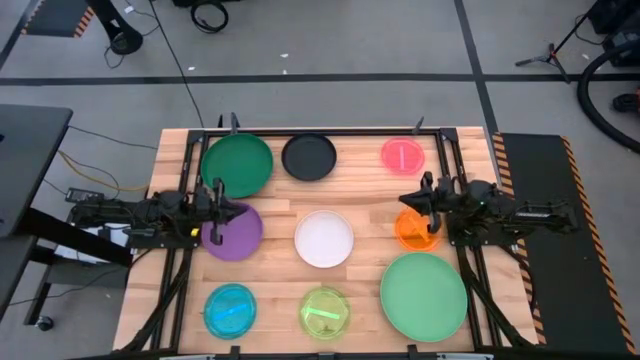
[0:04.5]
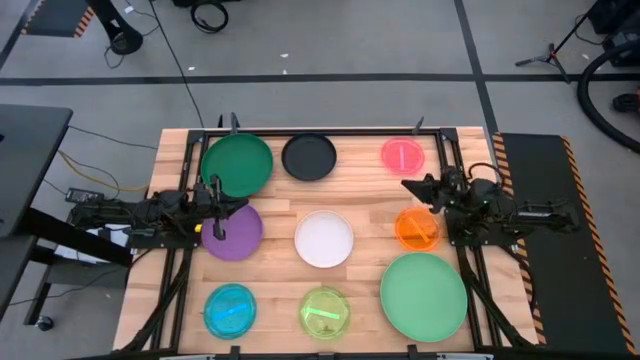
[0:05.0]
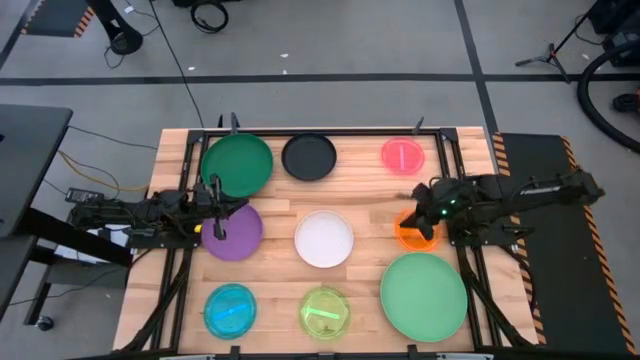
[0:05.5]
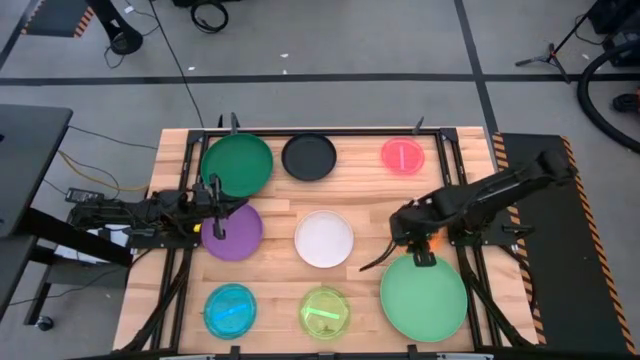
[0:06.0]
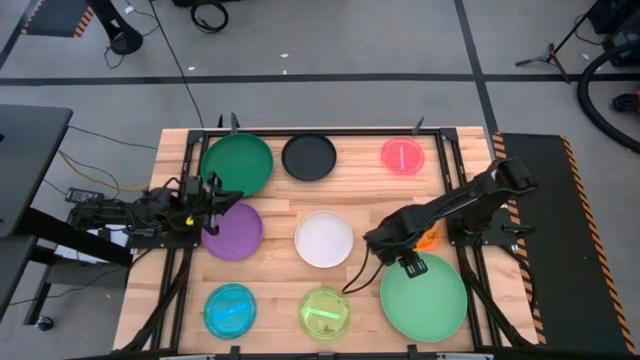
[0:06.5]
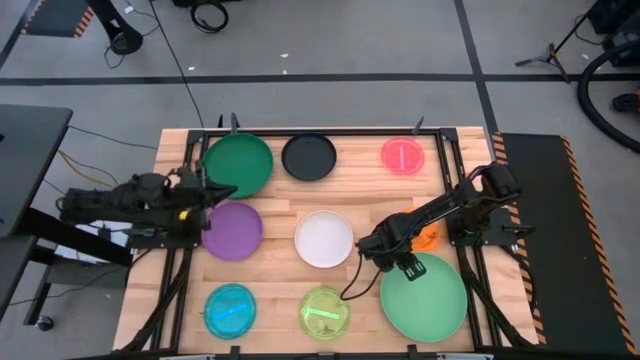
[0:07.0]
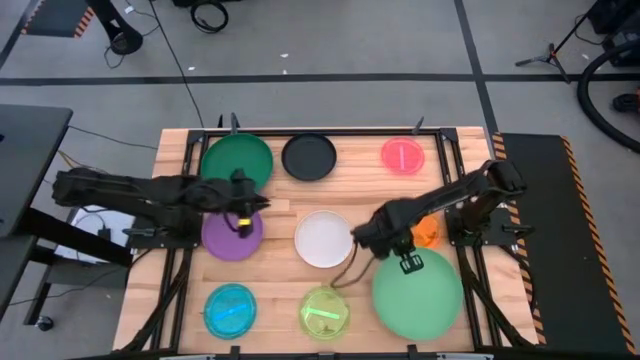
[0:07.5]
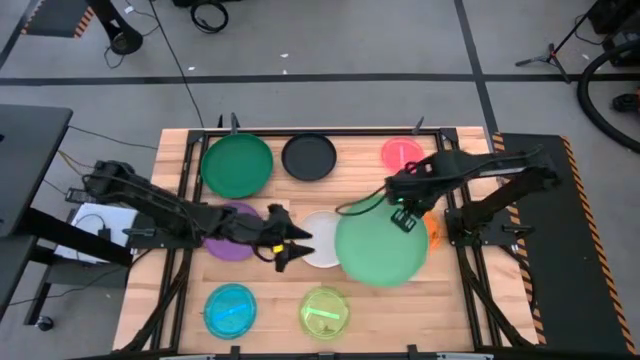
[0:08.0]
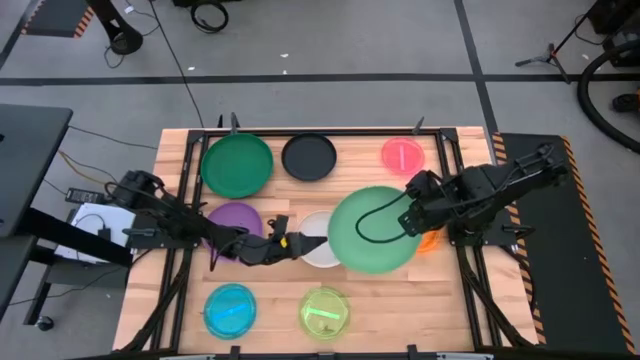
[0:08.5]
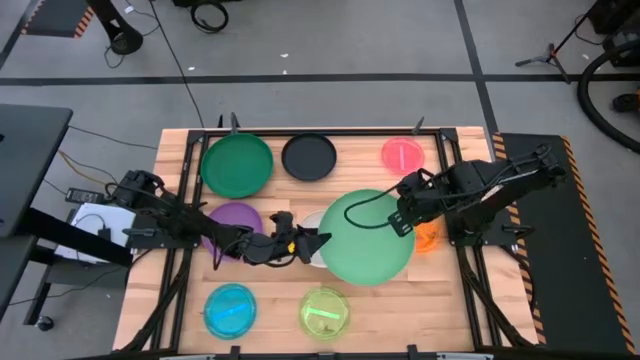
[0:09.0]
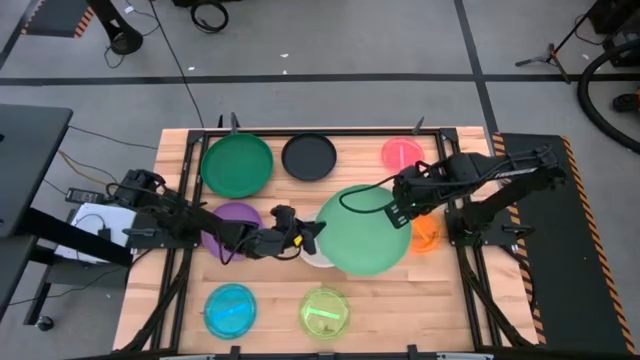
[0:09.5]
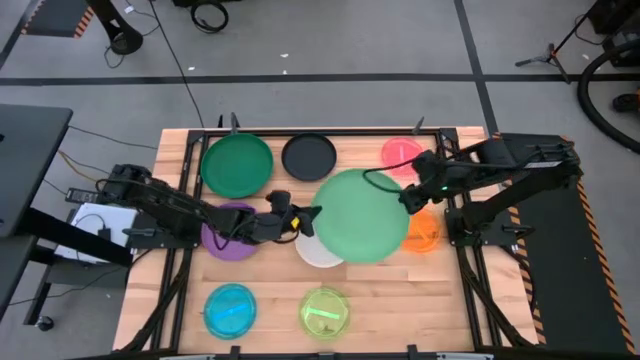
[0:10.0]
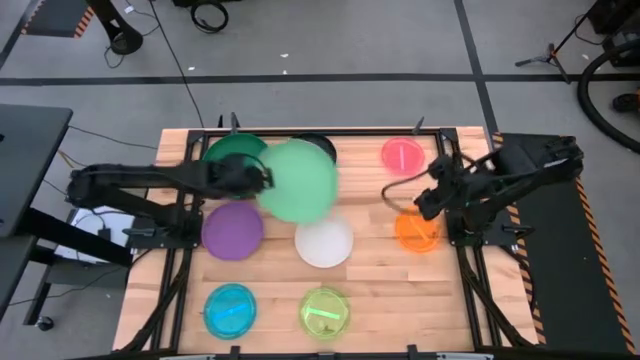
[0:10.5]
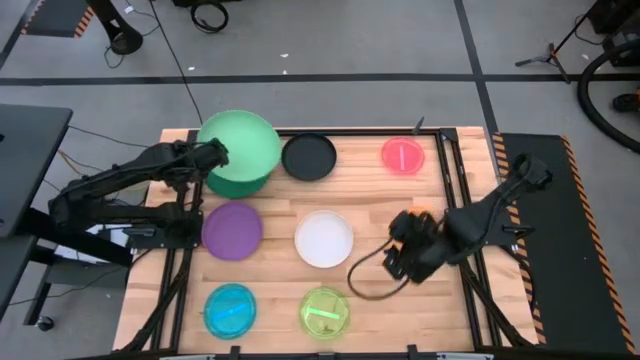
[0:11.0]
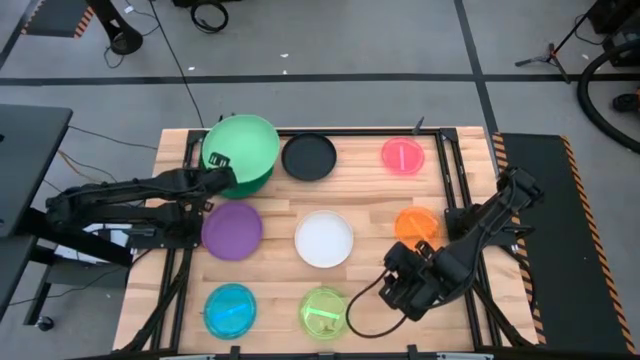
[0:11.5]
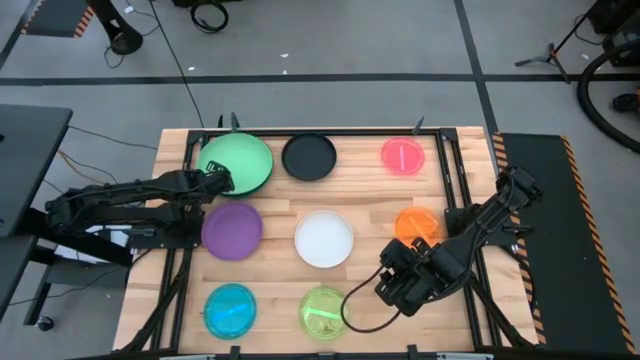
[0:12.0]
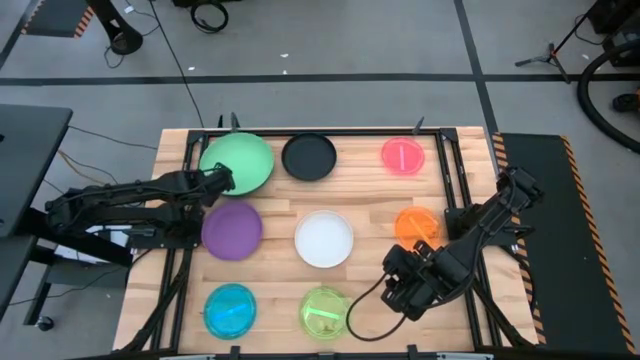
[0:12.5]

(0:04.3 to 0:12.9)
Task: Stack plastic plates
Stack the light green plate on top of the green plate

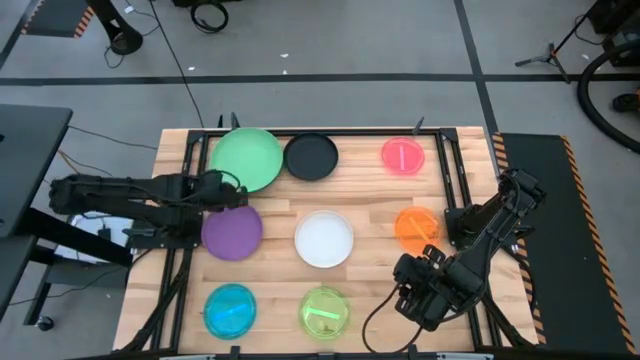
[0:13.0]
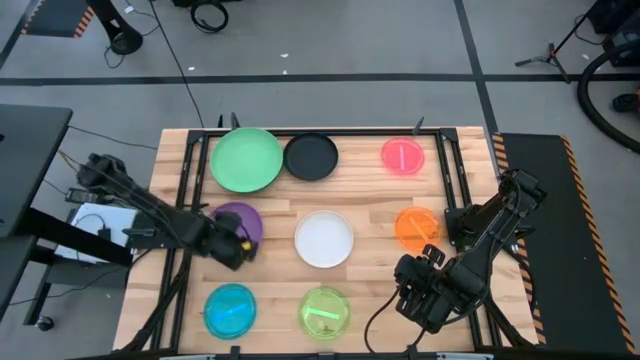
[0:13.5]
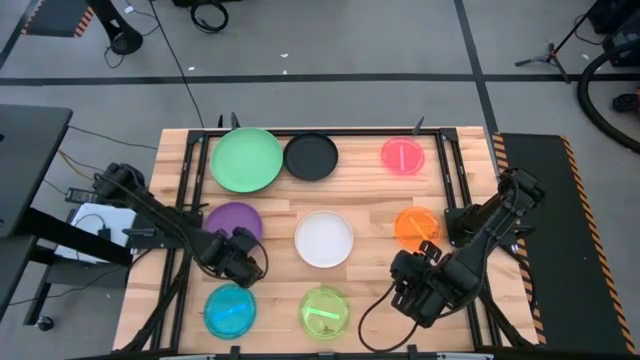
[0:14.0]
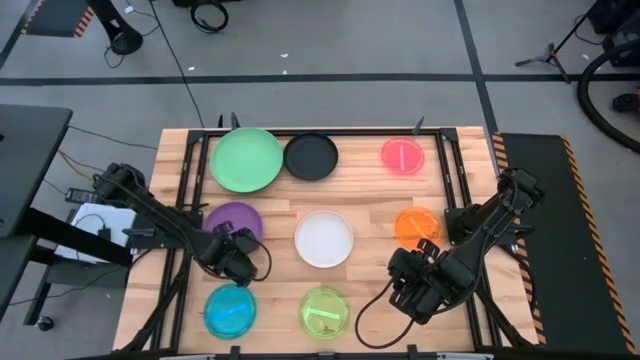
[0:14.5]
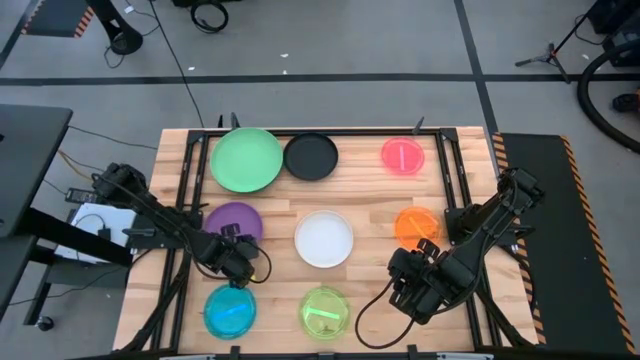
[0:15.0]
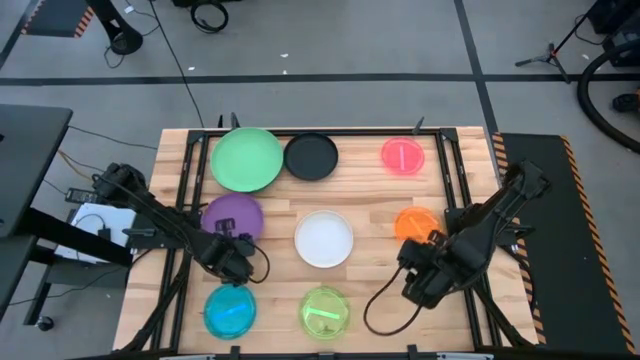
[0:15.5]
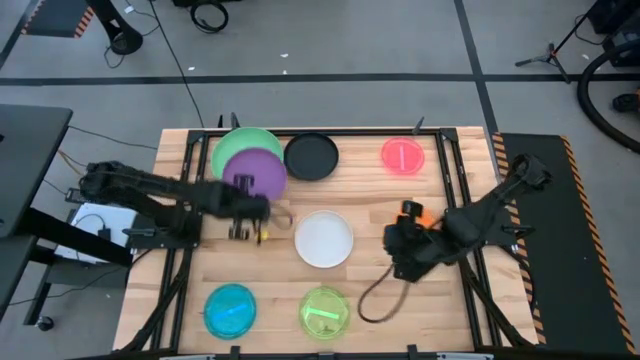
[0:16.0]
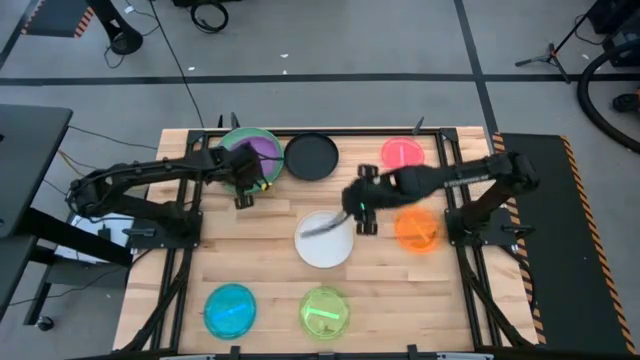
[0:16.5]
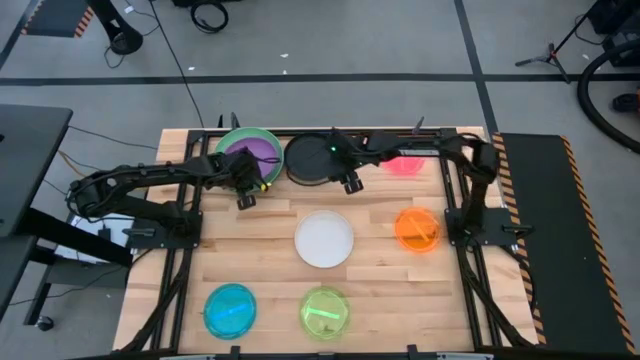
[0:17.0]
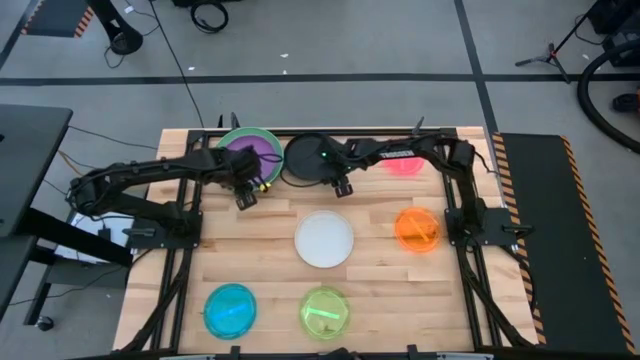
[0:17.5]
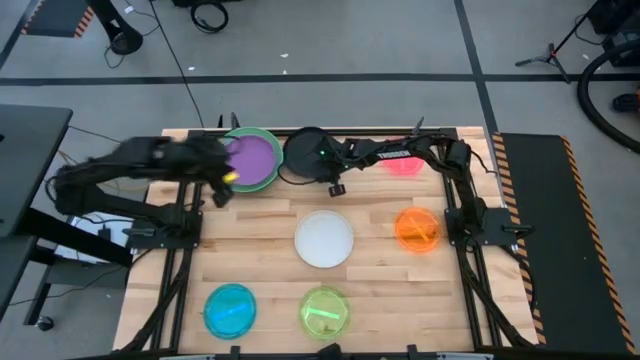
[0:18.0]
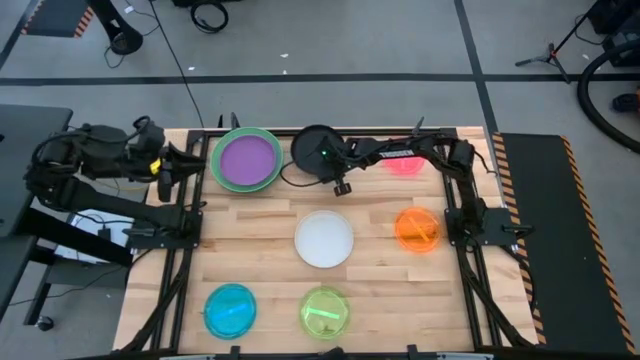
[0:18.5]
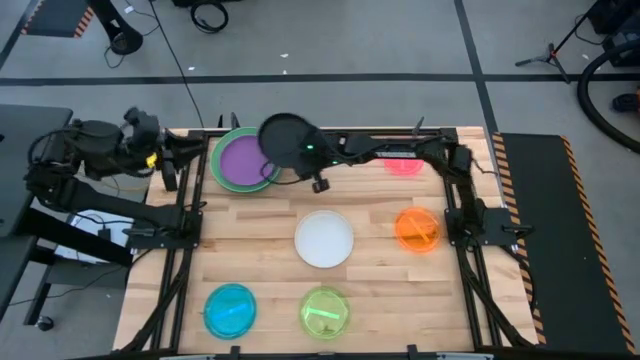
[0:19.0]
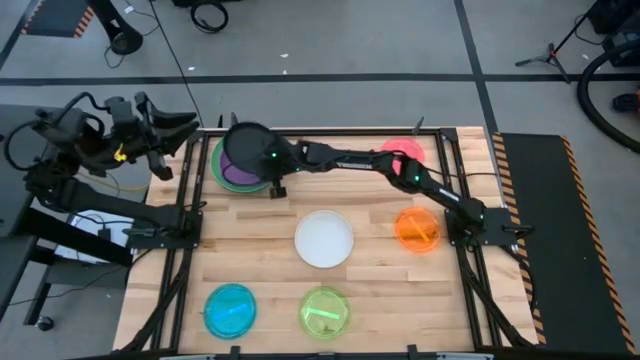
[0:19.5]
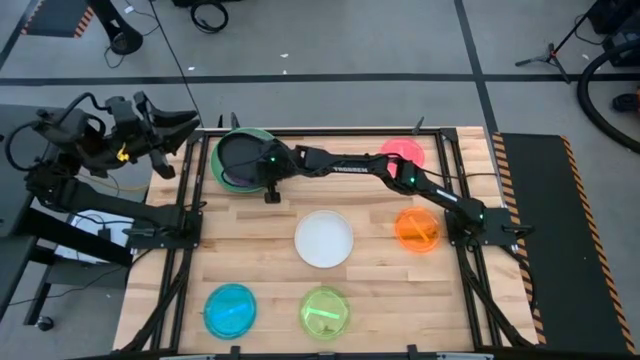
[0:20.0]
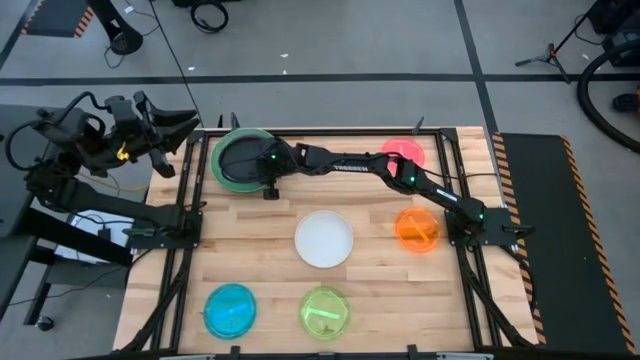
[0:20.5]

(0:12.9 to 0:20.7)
Stack the purple plate on top of the light green plate

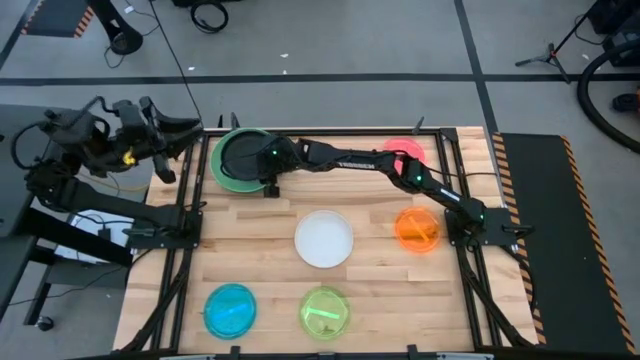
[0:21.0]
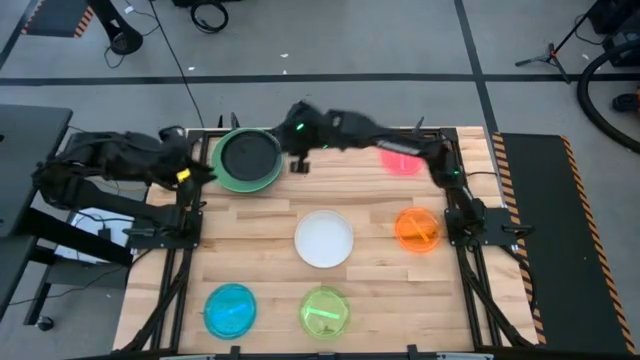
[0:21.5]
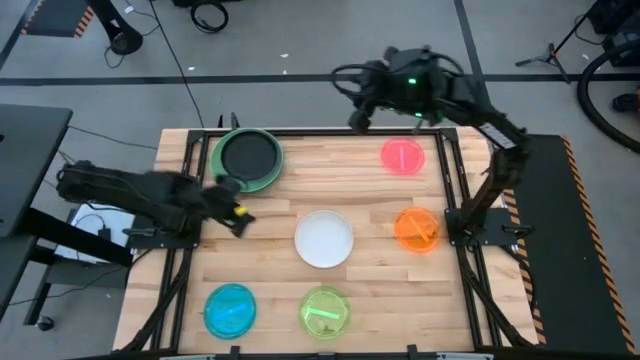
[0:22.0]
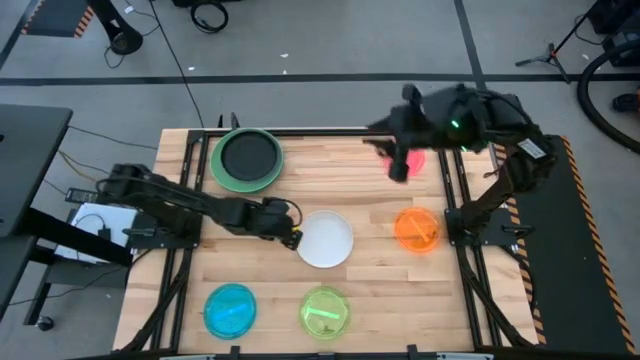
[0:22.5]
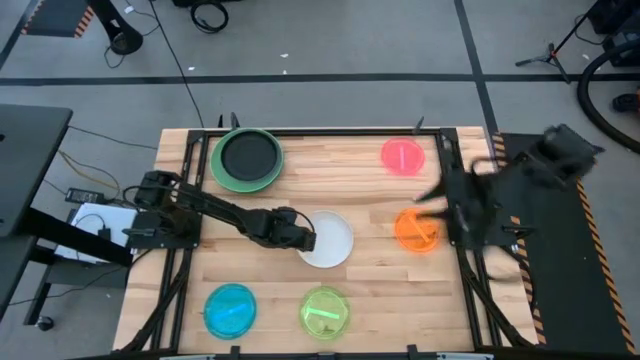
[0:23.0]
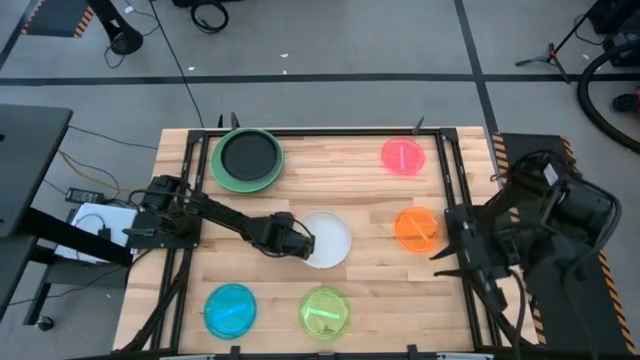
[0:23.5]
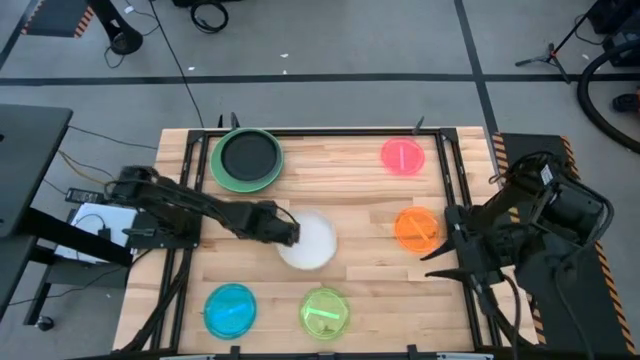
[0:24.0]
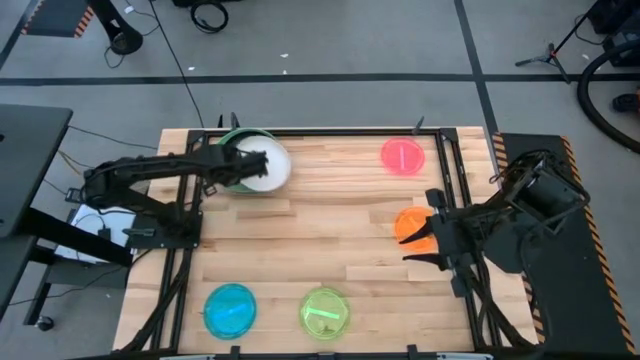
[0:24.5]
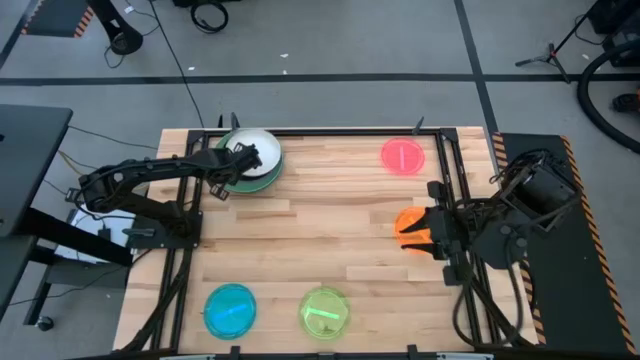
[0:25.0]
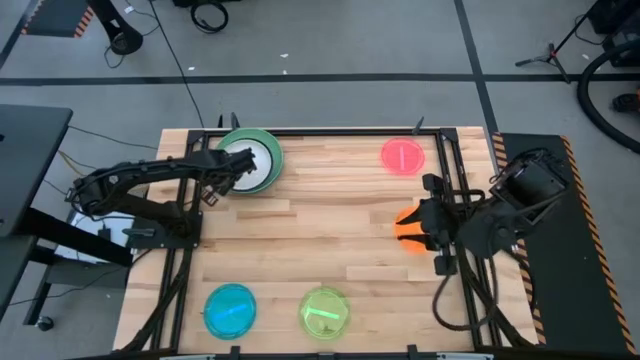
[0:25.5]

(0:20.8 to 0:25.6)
Stack the white plate on top of the black plate

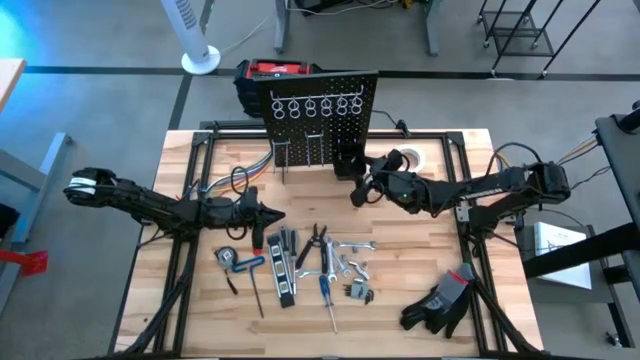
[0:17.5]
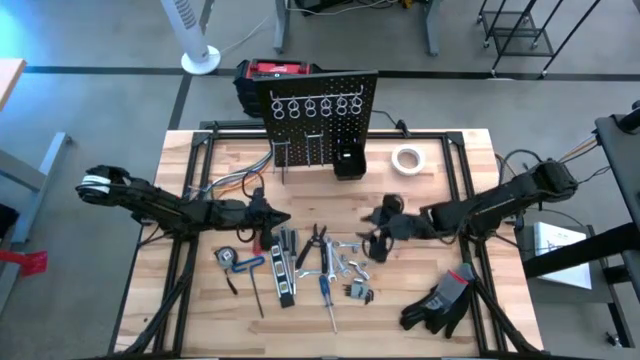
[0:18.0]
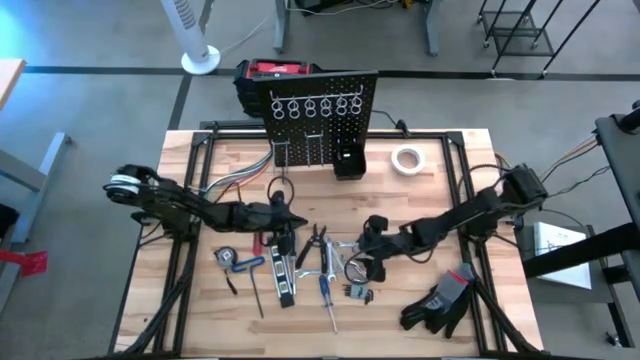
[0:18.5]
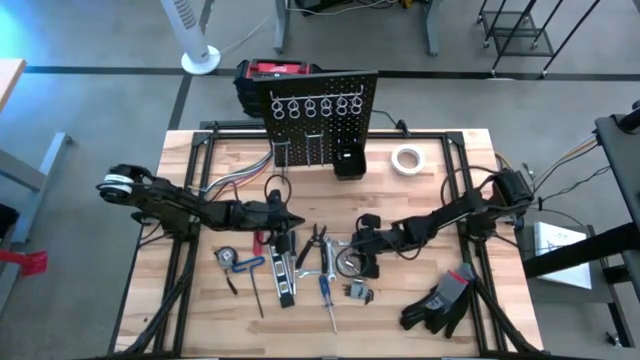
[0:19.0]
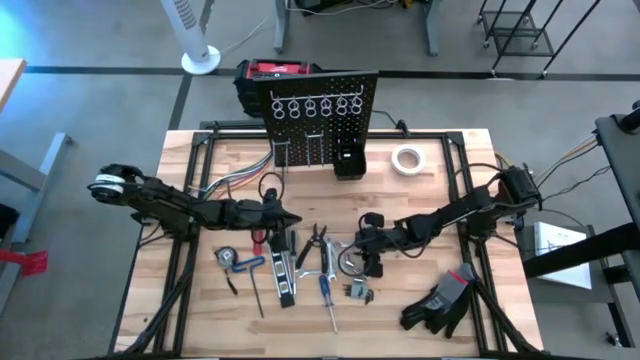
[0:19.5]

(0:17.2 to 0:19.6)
Task: Hang tools onto peg board
Put the socket into the black tool bin on the peg board
